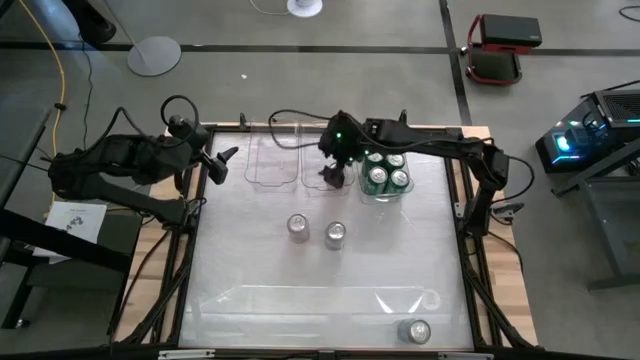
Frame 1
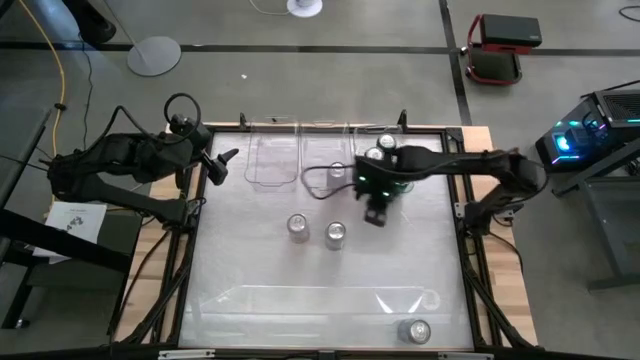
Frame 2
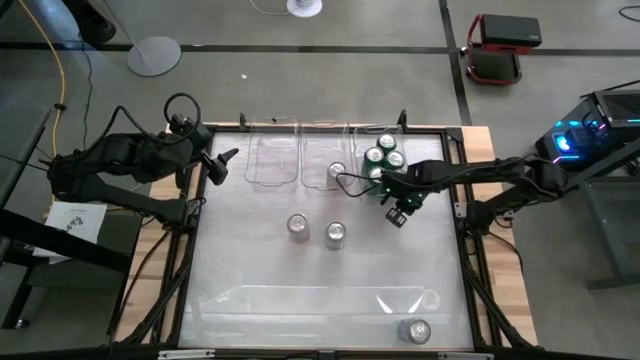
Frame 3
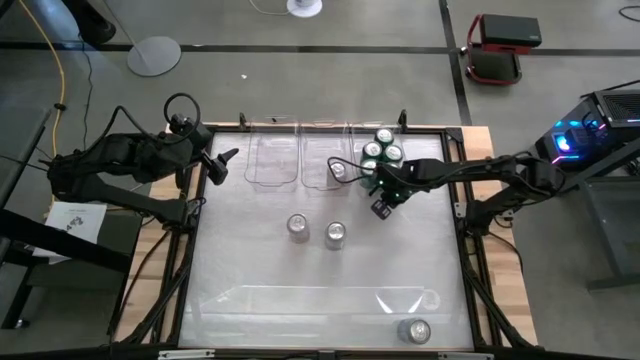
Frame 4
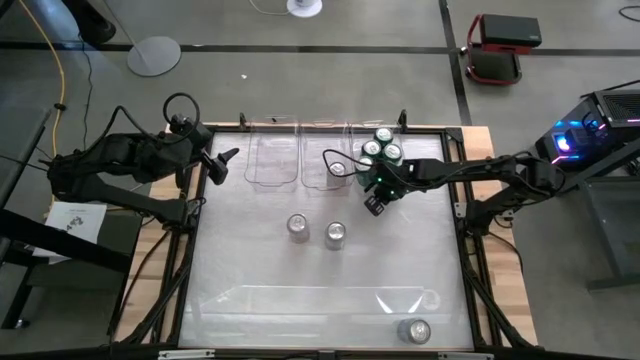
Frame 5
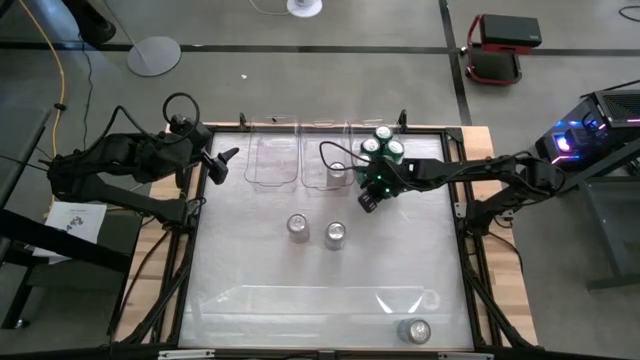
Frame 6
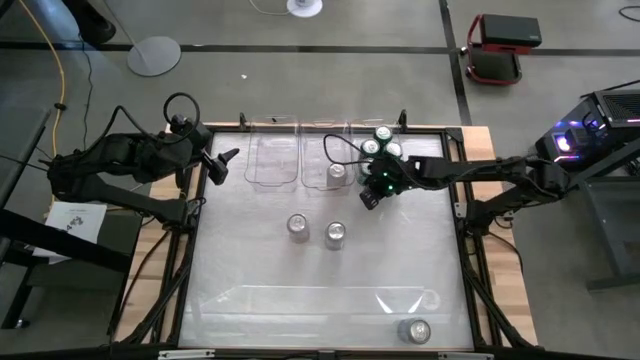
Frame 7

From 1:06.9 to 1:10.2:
Task: Sort soda cans
Adjust the right transparent bin

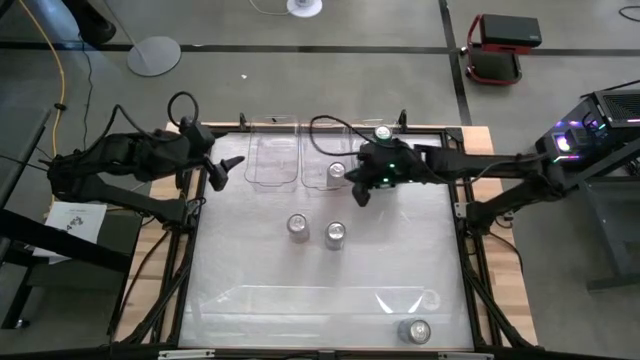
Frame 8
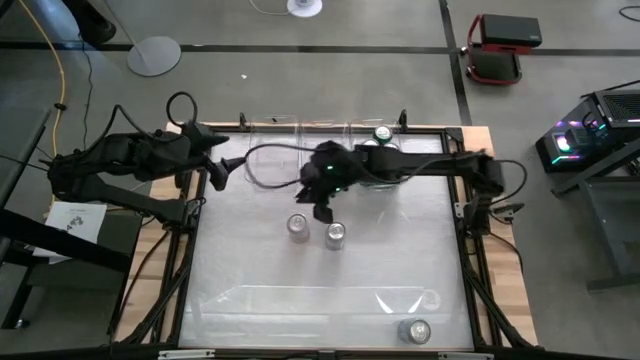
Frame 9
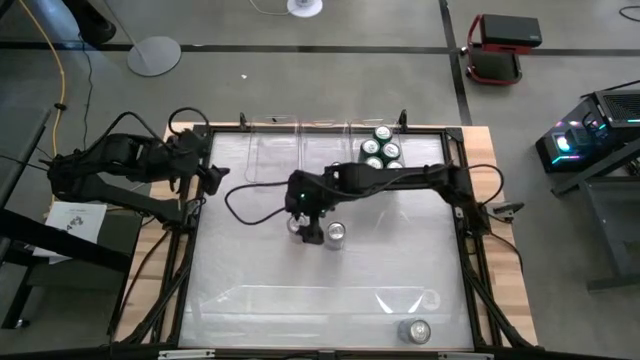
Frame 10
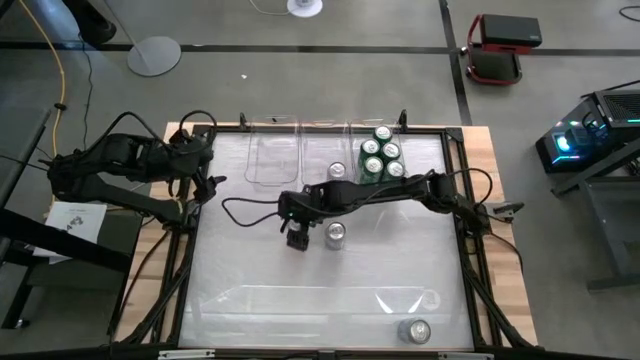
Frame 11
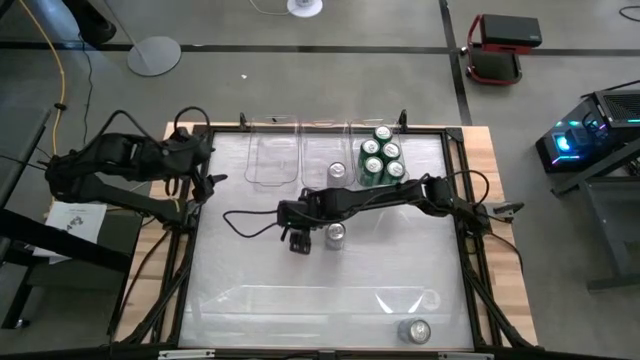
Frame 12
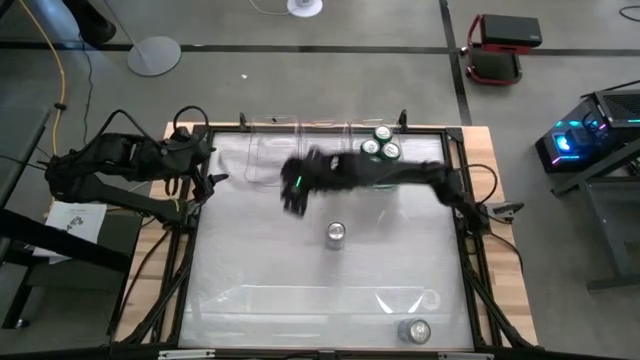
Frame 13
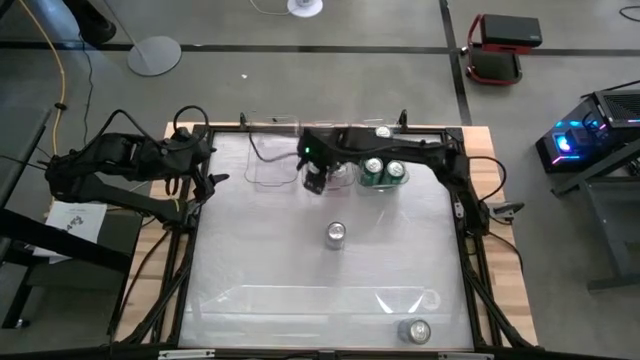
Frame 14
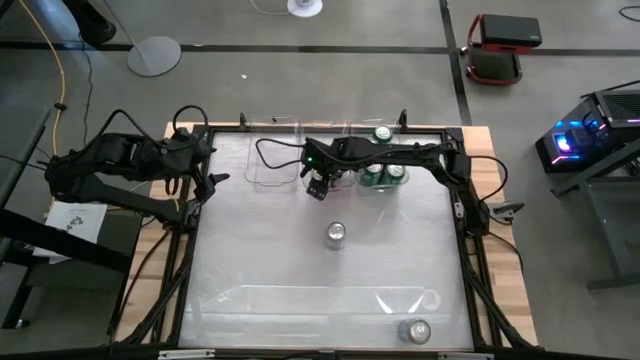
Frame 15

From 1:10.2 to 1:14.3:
Put the yellow-white soda can into the center transparent bin

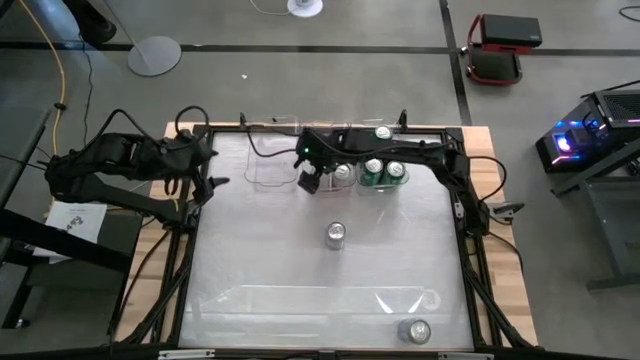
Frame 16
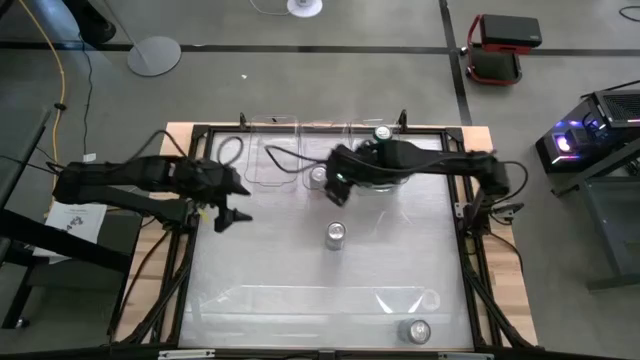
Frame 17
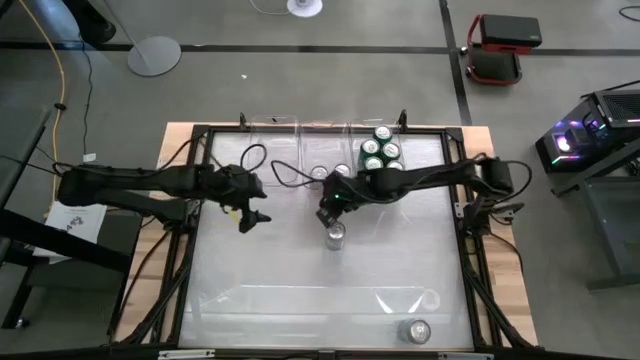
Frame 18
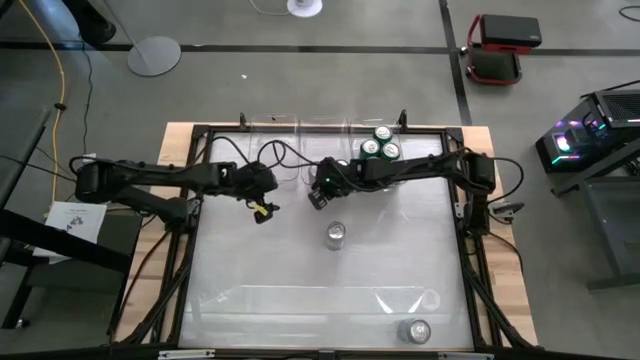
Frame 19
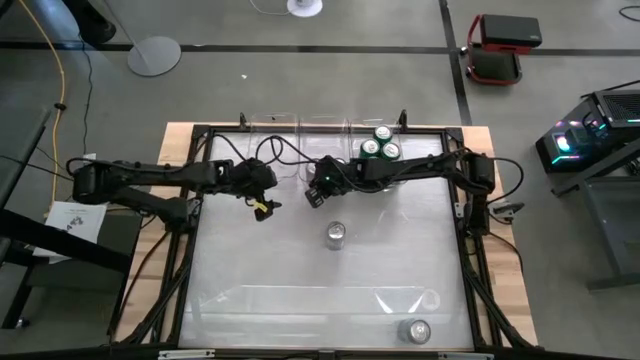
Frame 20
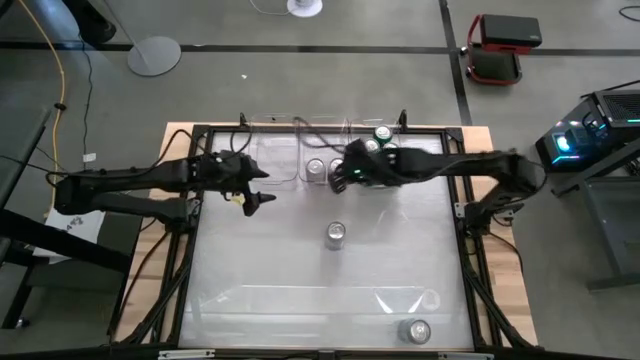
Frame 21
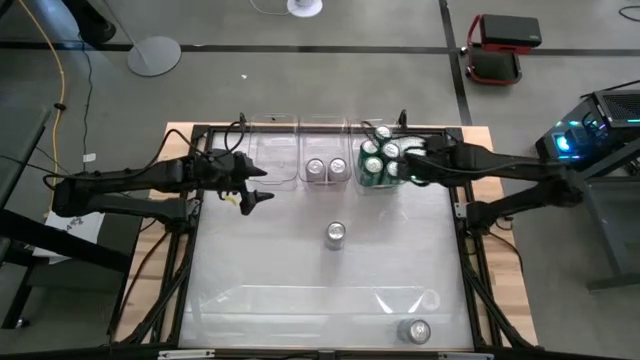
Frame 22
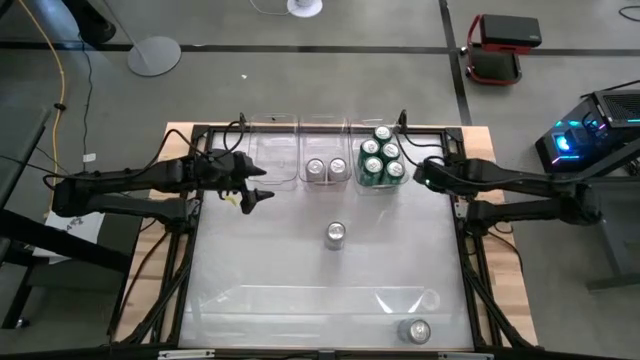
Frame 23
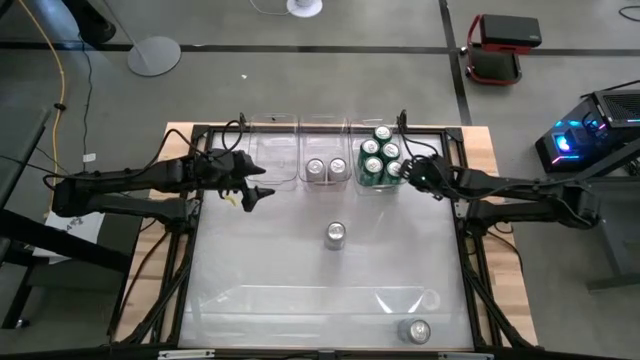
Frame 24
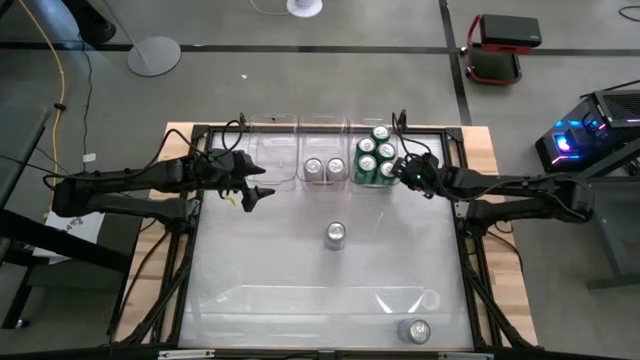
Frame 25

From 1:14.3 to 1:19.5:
Adjust the transparent bins

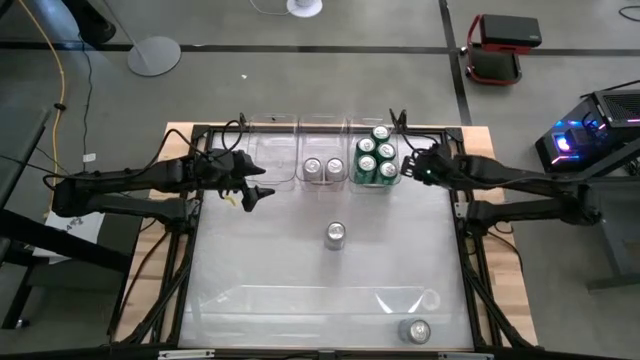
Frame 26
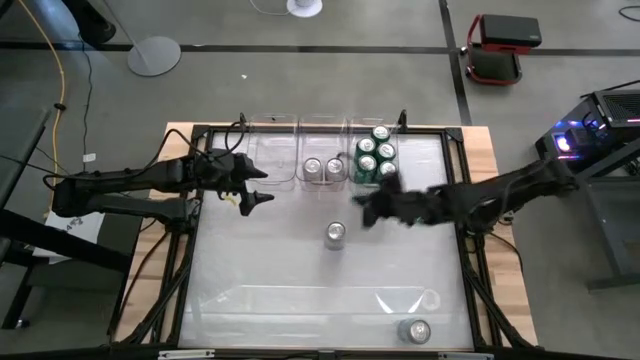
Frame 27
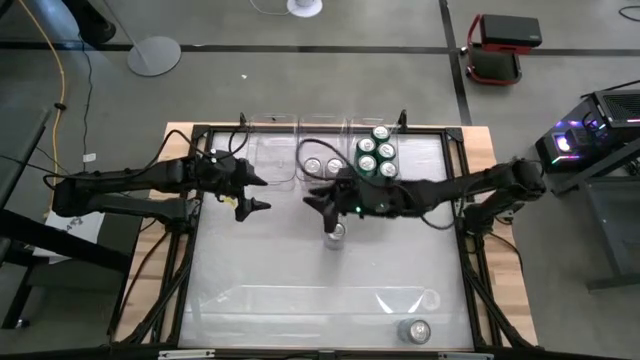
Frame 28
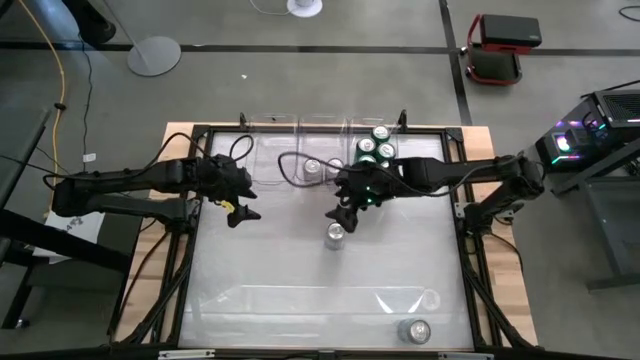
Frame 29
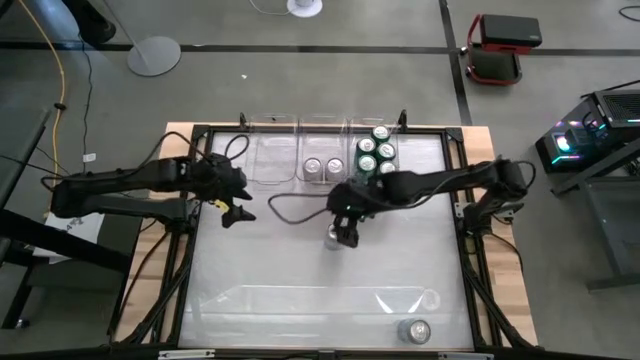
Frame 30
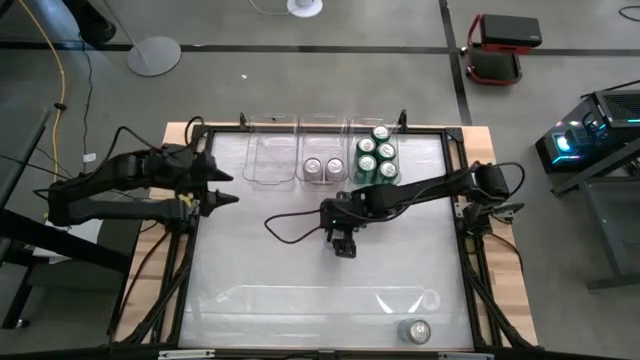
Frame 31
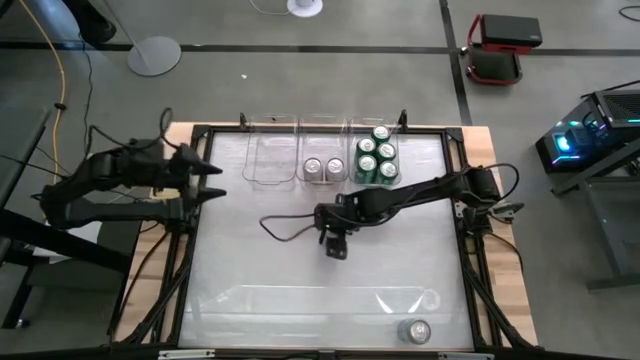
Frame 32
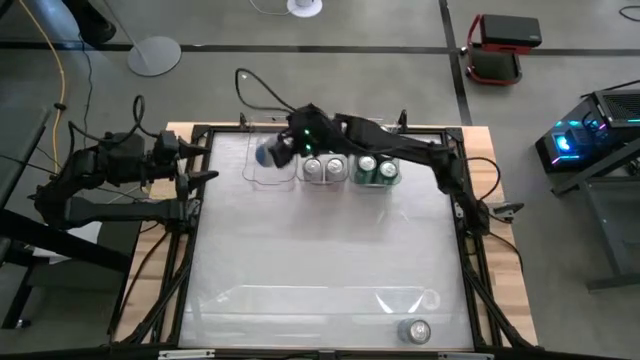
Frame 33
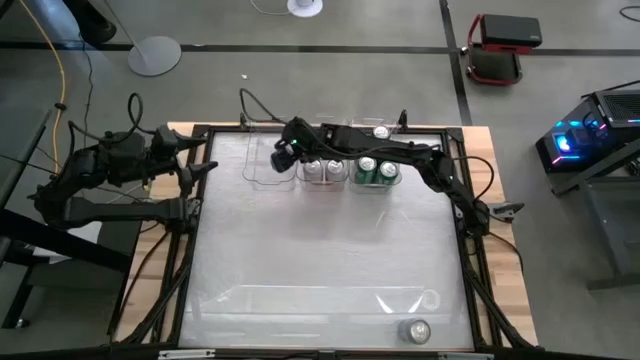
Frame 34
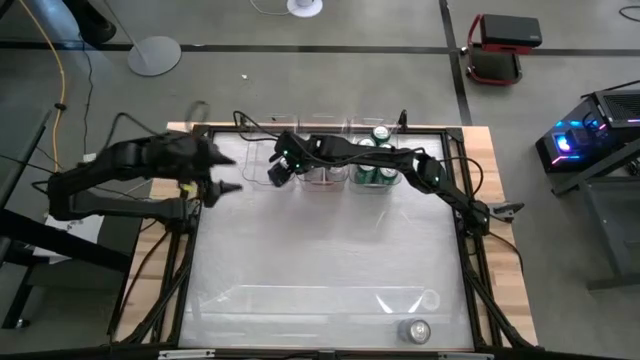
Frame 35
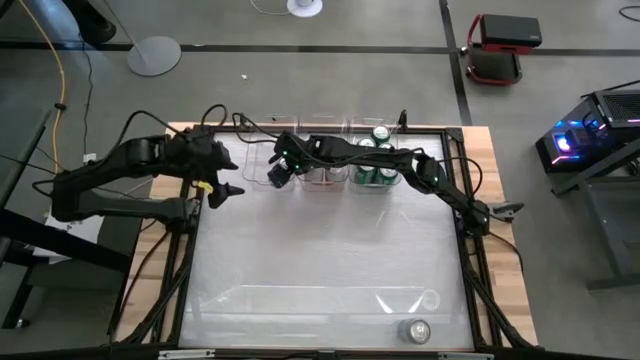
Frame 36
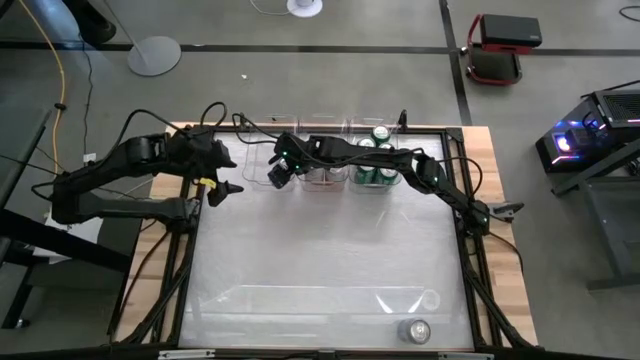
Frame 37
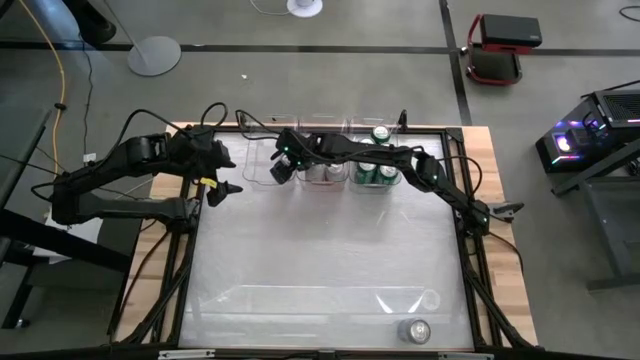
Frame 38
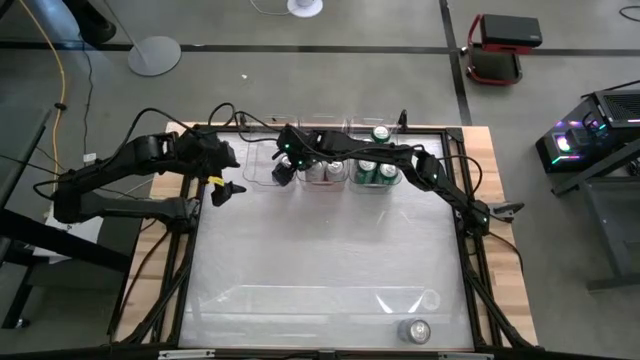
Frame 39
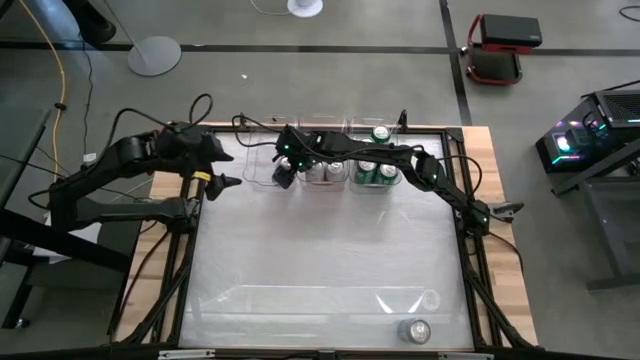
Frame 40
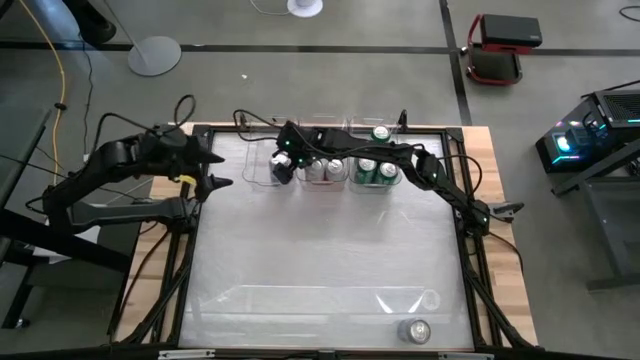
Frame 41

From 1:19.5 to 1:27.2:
Put the blue-white soda can into the left transparent bin
